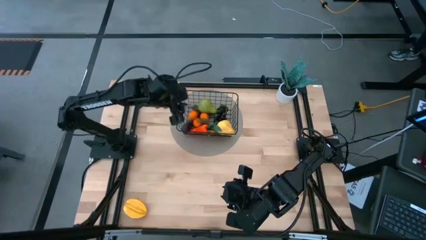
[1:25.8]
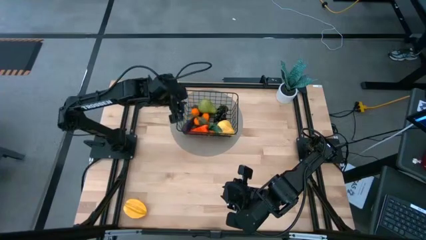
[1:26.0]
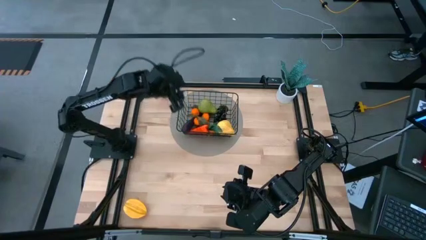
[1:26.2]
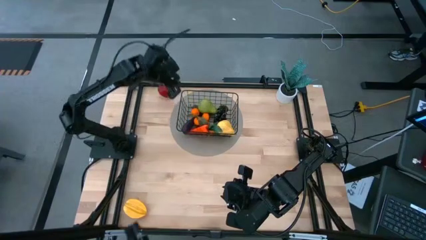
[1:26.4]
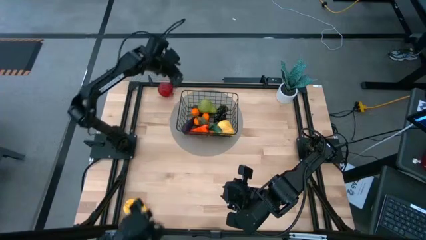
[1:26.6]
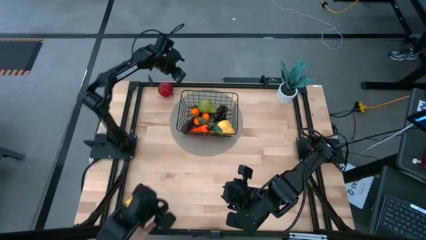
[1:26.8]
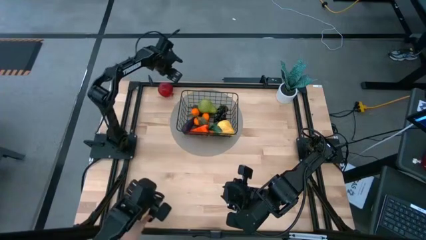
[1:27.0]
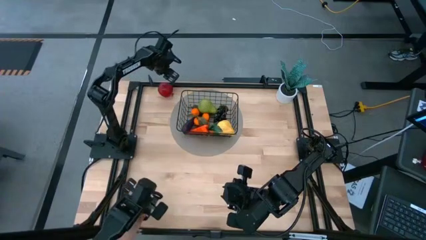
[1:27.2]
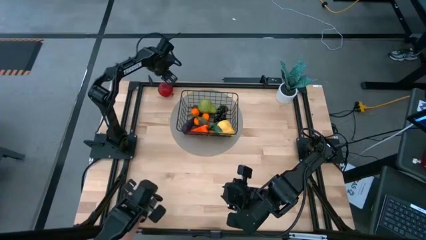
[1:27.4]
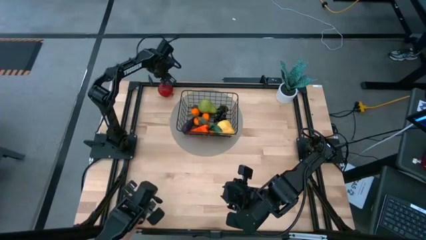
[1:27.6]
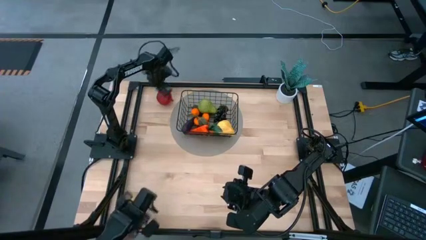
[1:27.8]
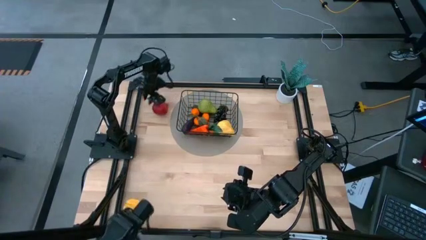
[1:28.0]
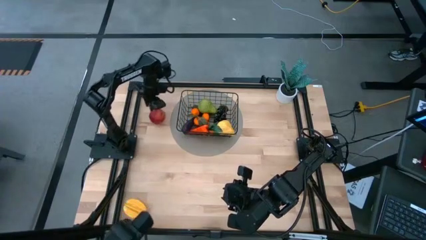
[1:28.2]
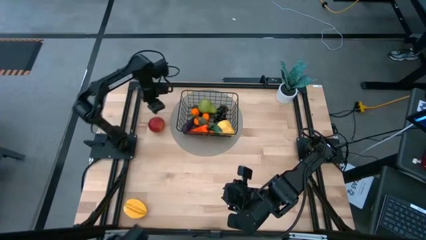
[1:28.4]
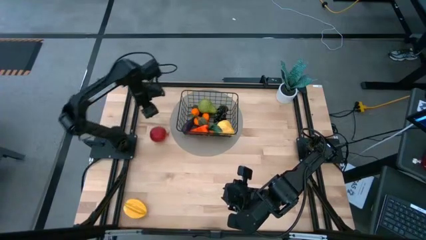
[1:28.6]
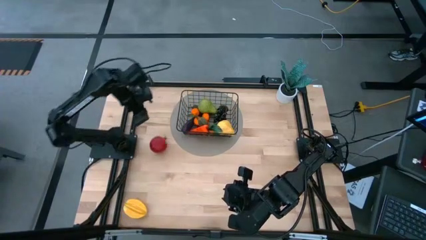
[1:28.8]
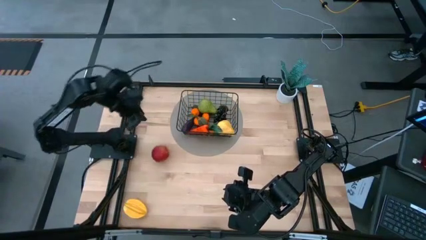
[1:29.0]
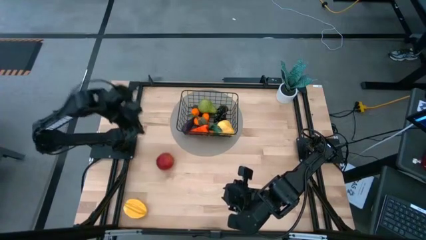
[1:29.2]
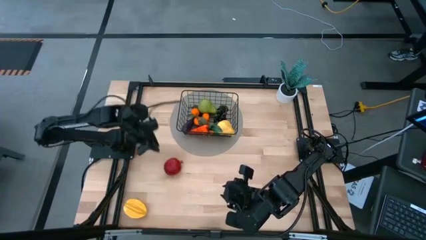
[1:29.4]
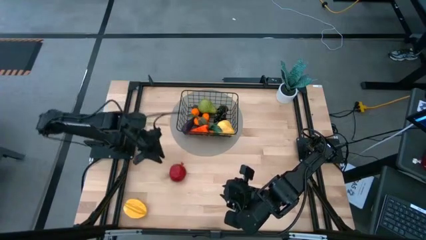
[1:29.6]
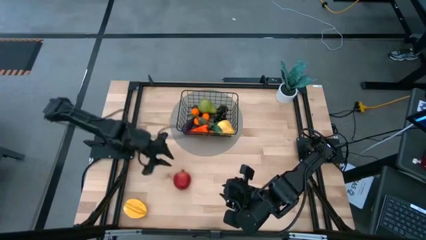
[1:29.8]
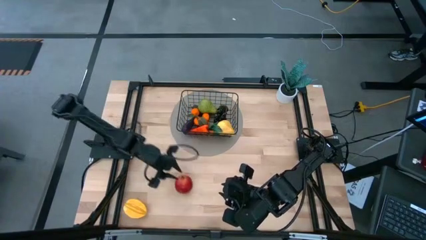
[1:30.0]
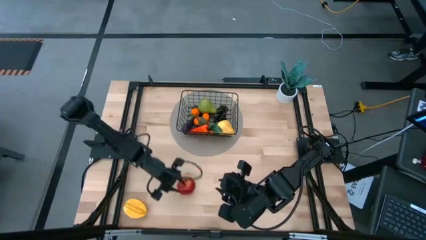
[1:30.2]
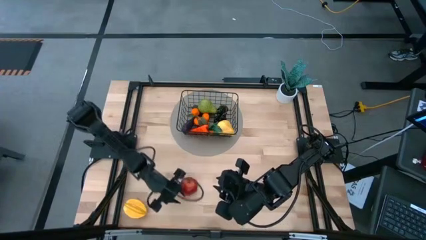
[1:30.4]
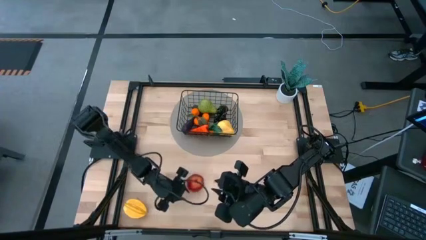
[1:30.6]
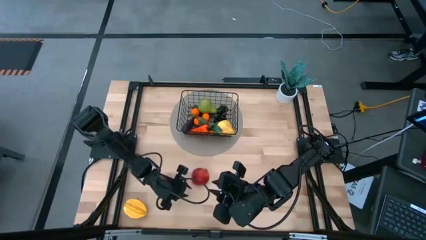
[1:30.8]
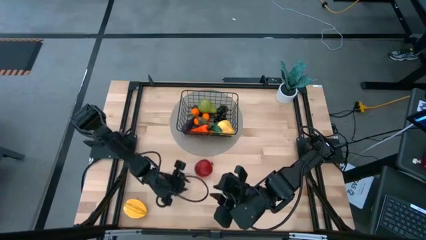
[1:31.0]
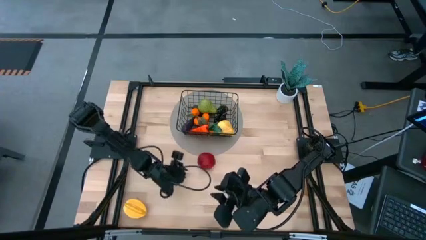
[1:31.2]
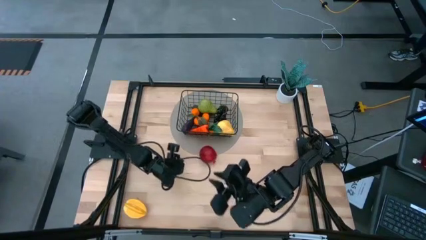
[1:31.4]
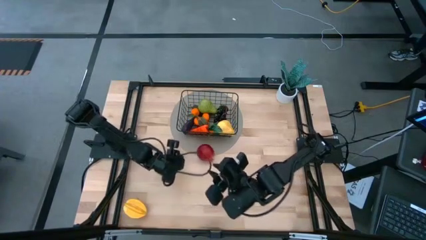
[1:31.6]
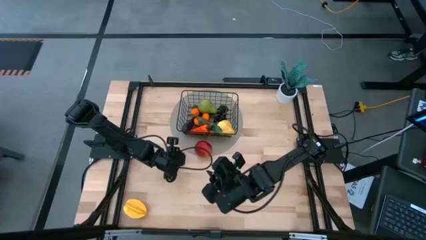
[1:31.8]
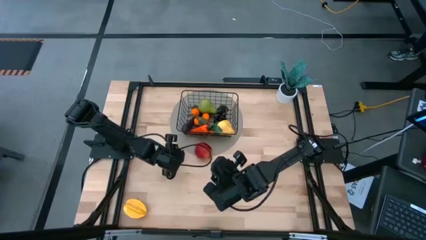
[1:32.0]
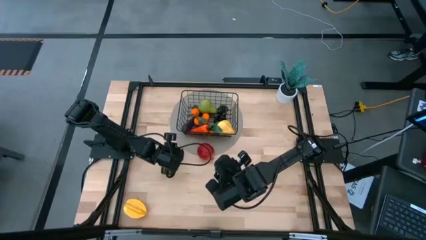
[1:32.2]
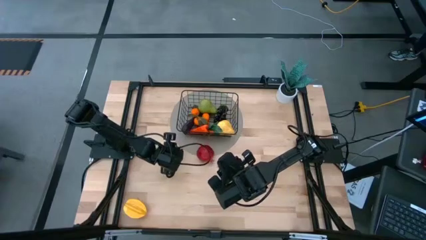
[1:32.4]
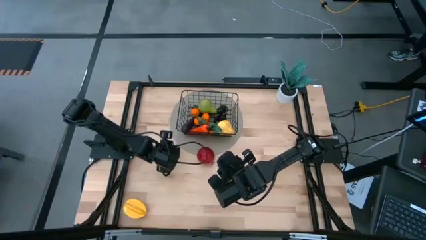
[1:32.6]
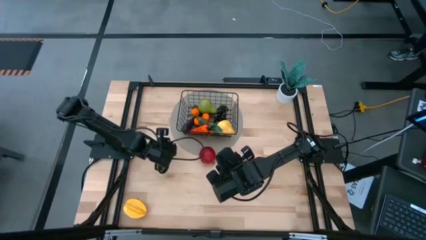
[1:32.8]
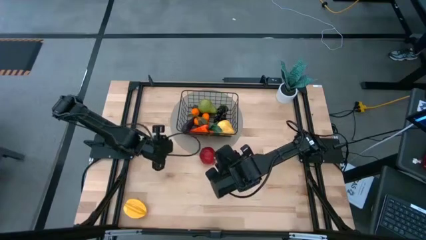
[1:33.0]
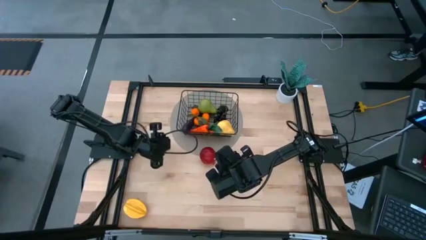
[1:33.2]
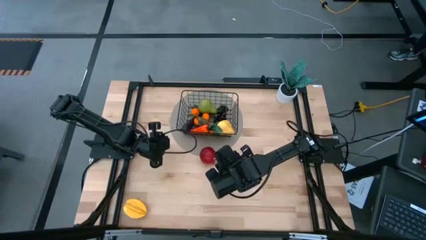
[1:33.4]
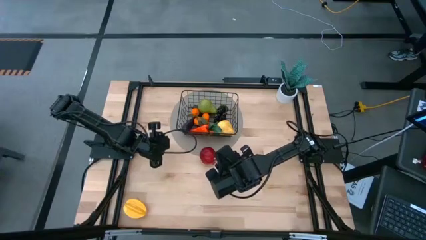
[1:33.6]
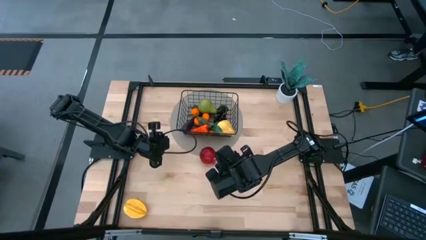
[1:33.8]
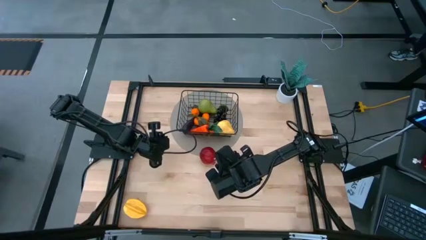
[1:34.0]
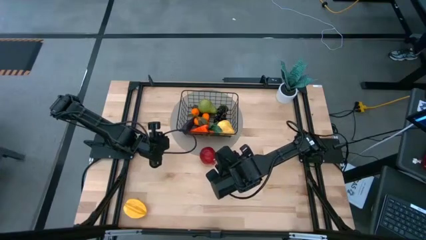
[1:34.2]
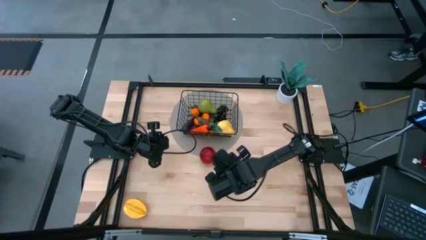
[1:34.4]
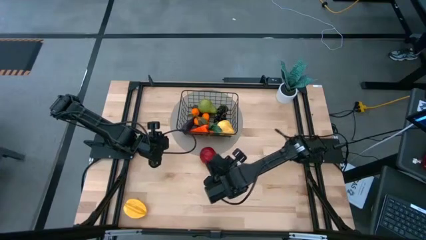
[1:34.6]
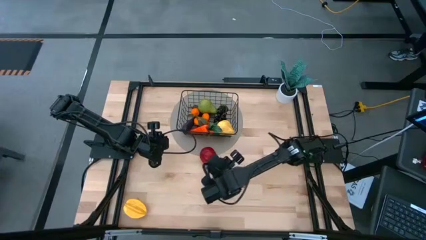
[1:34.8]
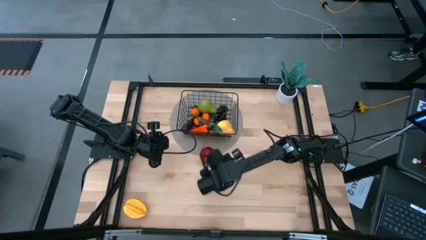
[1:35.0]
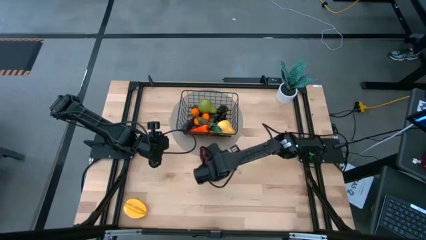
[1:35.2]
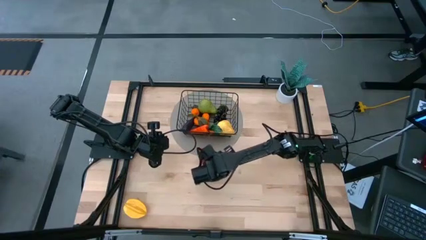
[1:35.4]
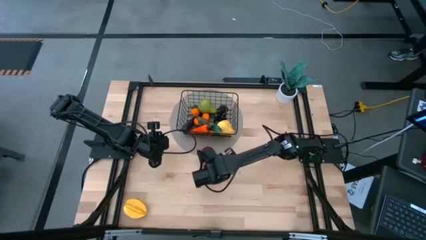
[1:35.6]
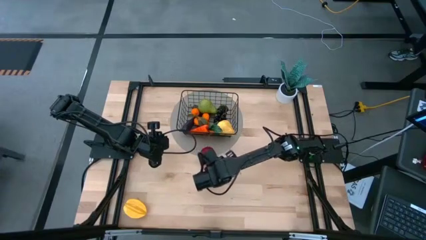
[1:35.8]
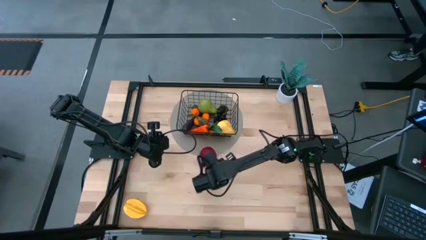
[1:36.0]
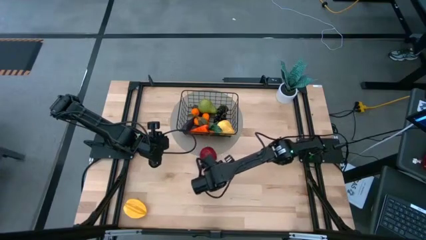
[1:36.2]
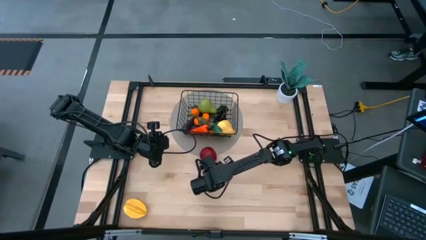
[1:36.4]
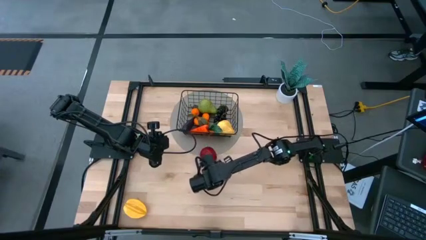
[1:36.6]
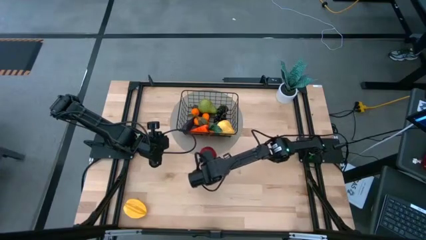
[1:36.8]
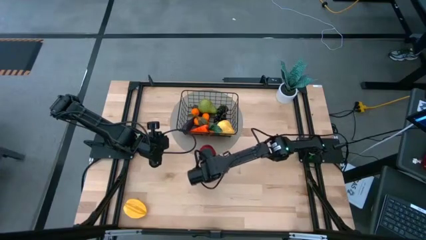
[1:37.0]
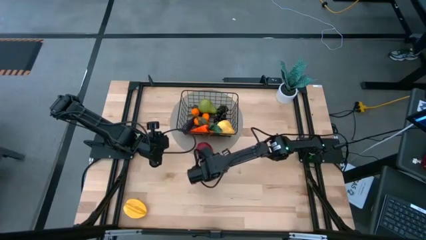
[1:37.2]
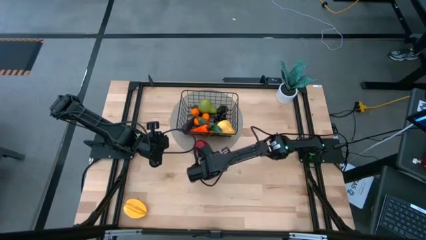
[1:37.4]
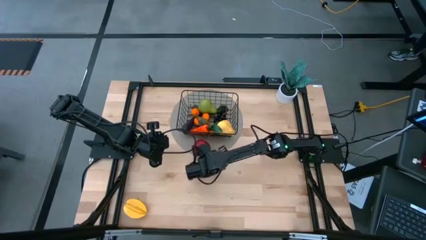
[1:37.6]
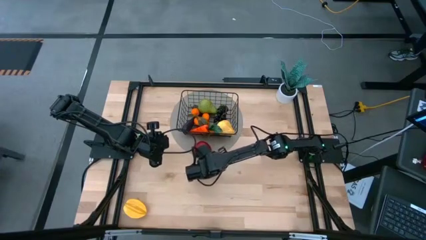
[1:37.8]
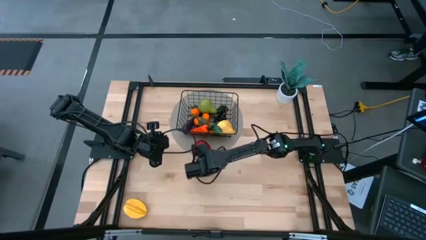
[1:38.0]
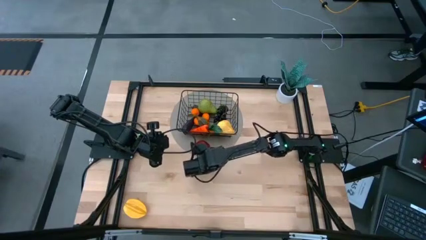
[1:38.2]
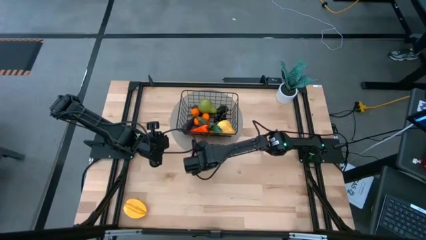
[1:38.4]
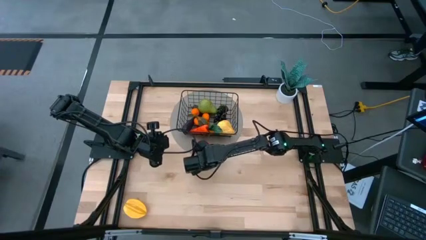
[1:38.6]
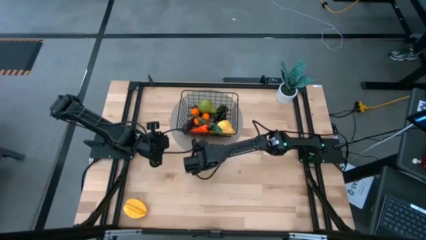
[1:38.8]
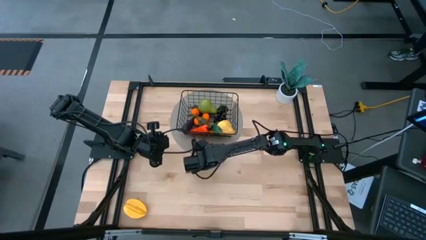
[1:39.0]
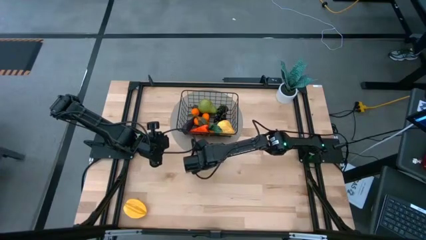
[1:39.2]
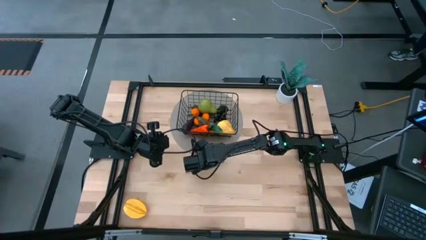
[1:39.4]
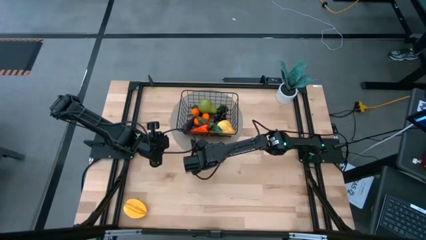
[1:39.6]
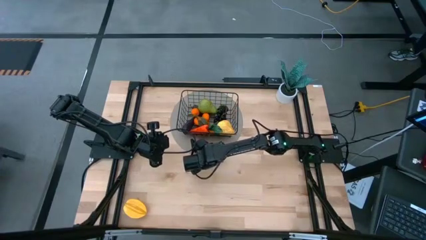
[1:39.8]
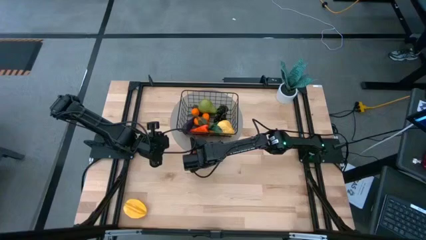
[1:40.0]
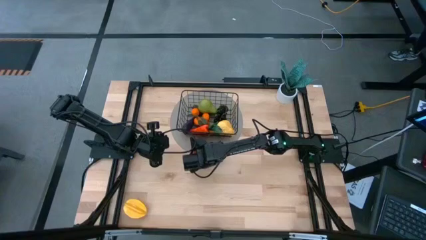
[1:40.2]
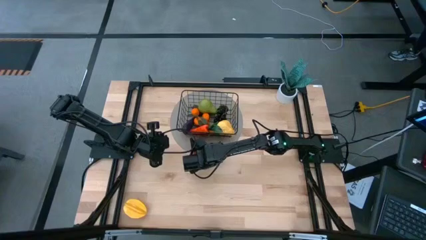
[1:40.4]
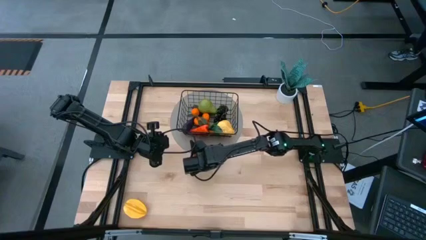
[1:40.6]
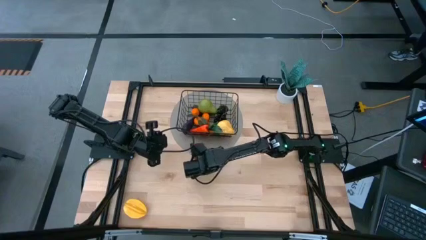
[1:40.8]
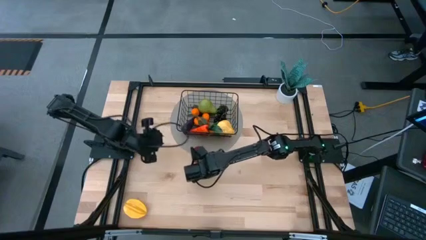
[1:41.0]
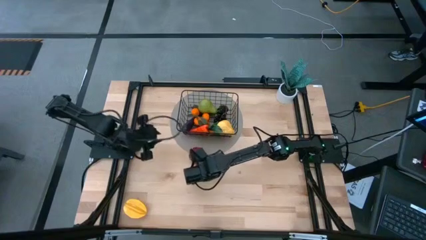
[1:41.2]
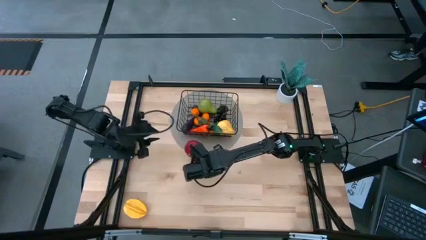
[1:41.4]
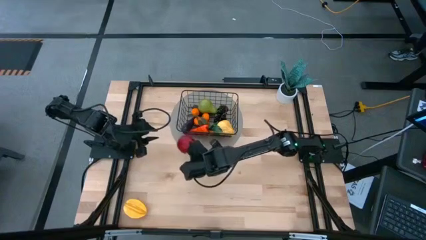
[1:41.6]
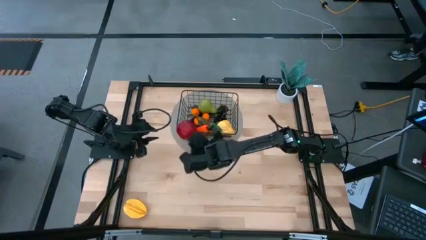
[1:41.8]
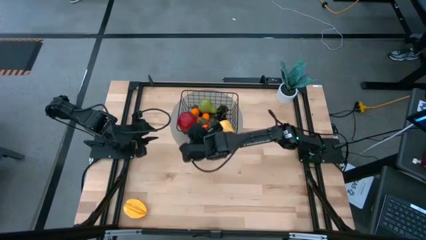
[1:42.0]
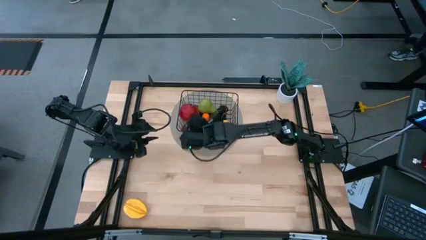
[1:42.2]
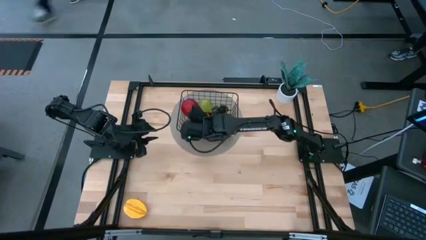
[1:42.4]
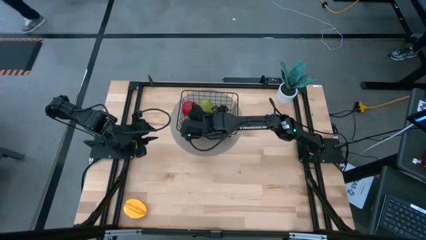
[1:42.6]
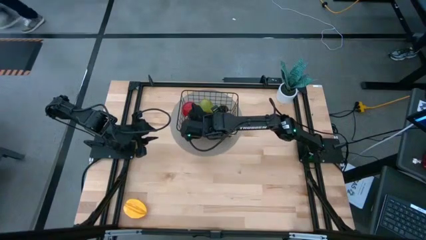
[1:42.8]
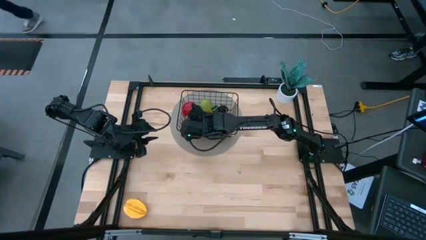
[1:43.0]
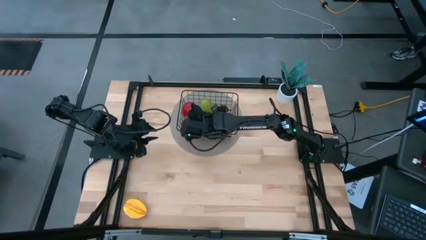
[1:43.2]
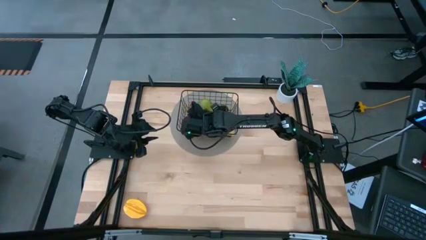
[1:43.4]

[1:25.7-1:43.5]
Task: Build produce basket
Put the red pomegranate into the black wire basket
